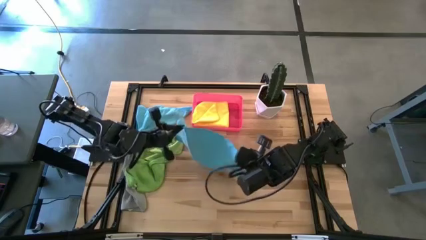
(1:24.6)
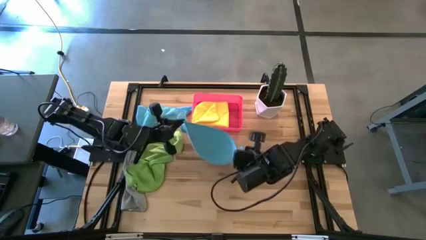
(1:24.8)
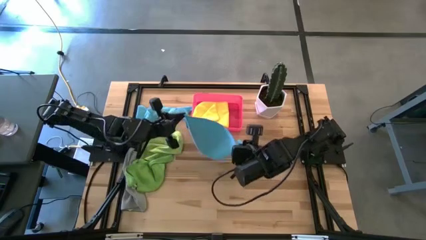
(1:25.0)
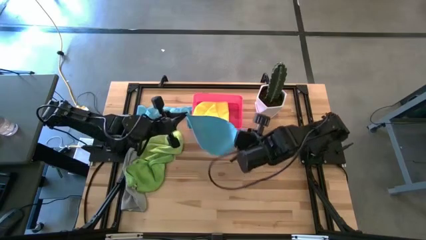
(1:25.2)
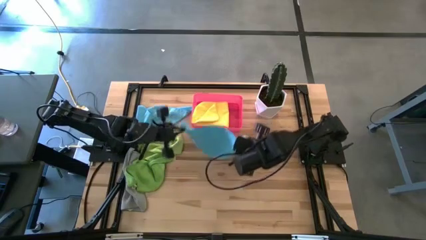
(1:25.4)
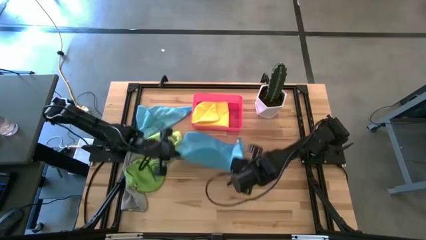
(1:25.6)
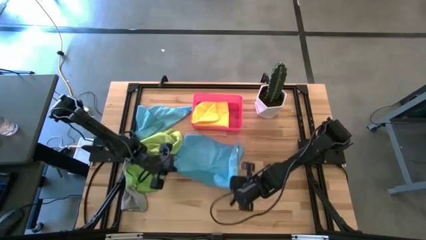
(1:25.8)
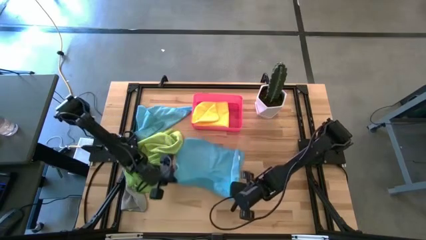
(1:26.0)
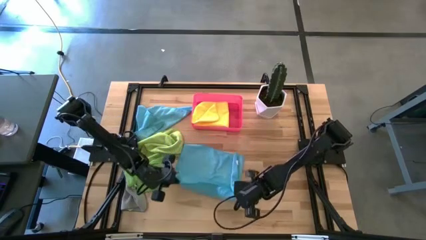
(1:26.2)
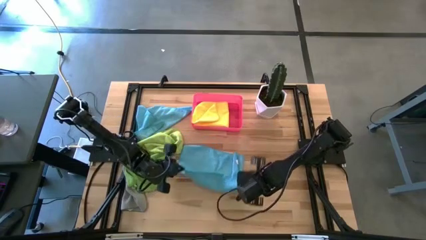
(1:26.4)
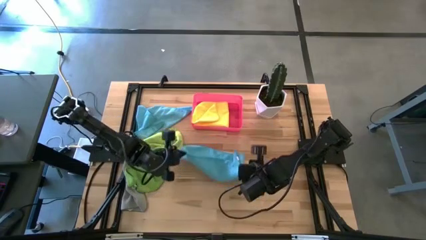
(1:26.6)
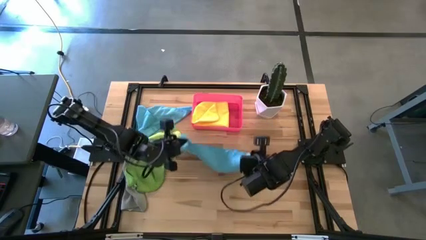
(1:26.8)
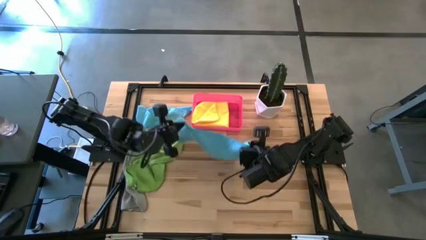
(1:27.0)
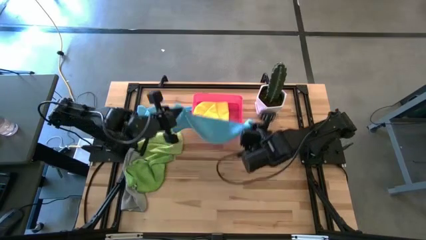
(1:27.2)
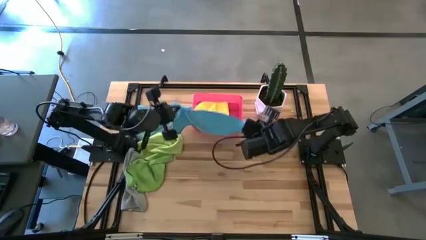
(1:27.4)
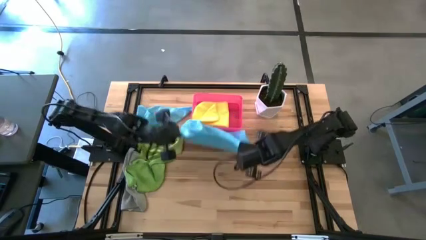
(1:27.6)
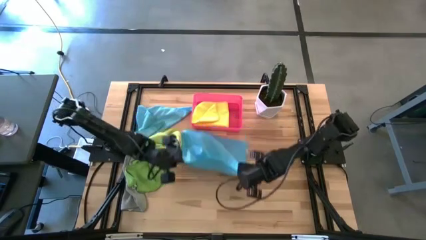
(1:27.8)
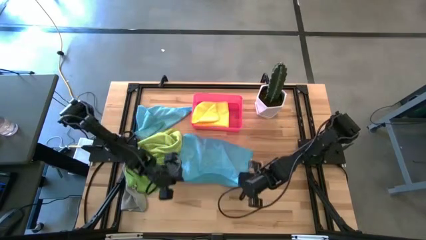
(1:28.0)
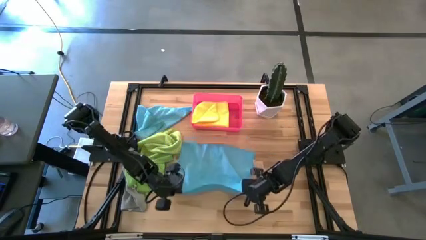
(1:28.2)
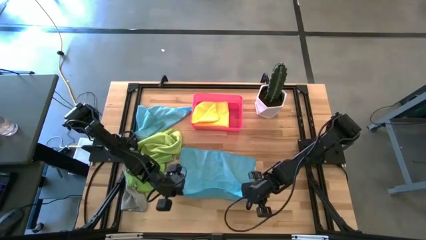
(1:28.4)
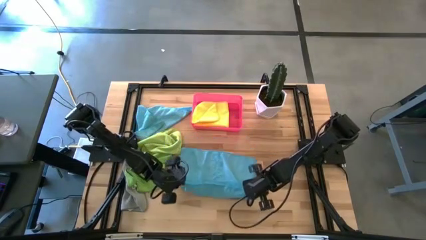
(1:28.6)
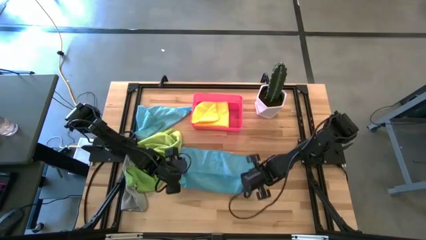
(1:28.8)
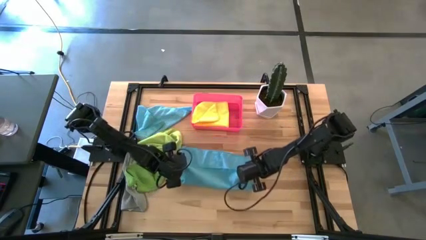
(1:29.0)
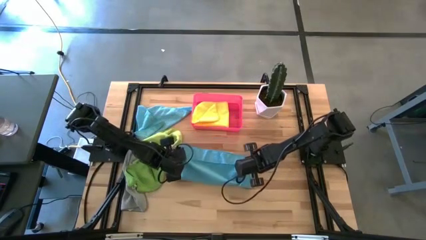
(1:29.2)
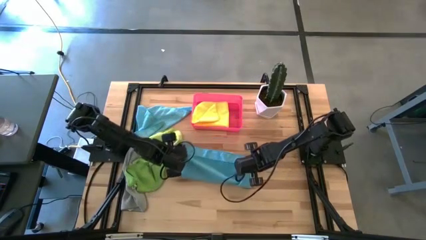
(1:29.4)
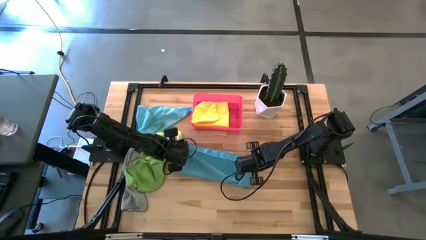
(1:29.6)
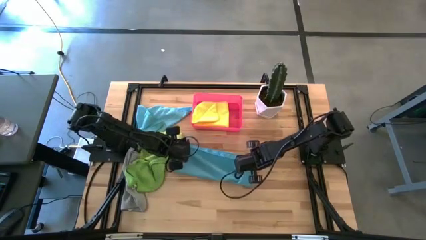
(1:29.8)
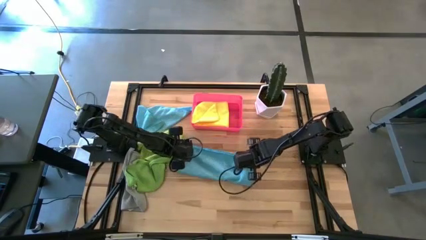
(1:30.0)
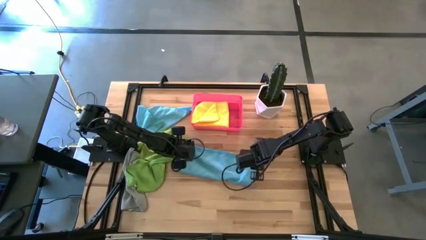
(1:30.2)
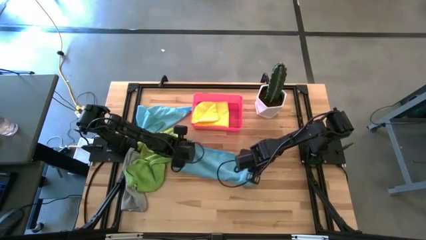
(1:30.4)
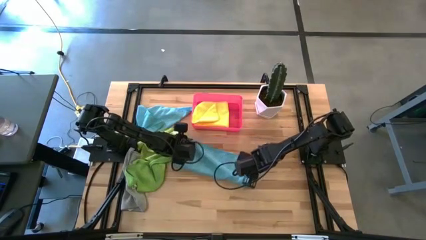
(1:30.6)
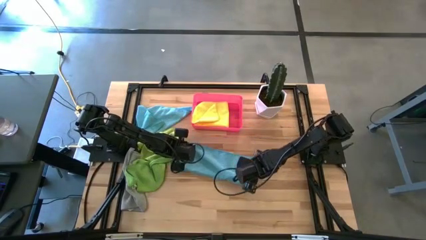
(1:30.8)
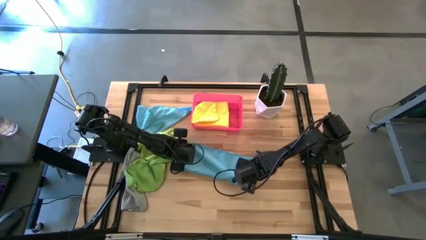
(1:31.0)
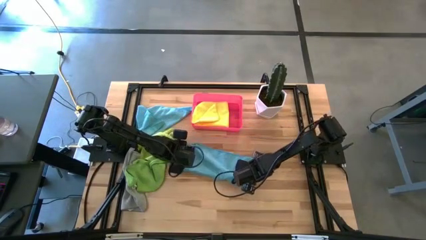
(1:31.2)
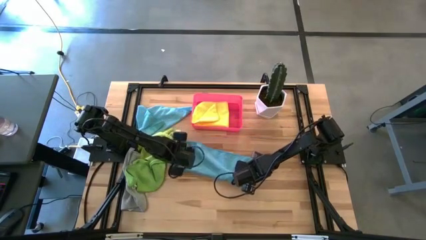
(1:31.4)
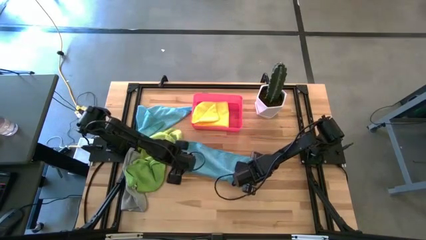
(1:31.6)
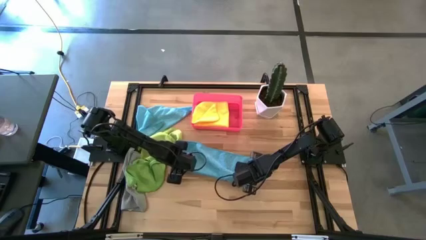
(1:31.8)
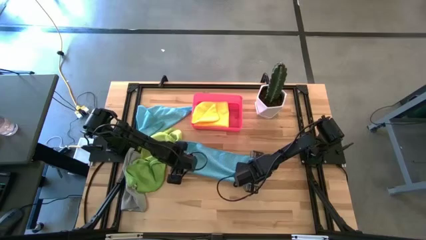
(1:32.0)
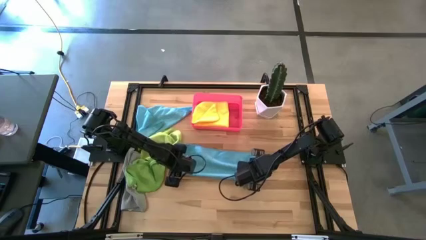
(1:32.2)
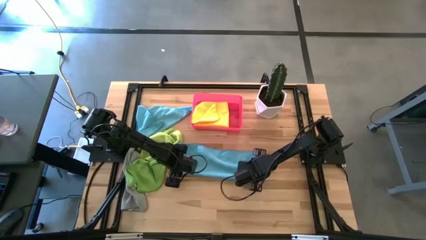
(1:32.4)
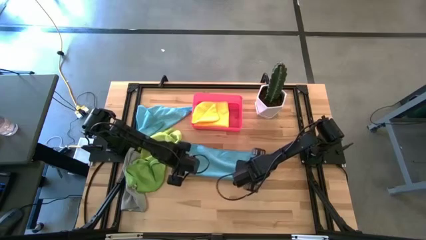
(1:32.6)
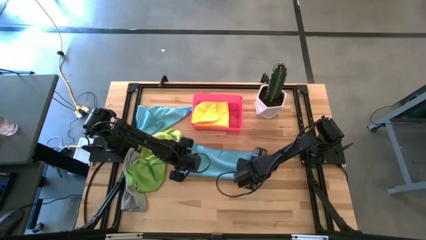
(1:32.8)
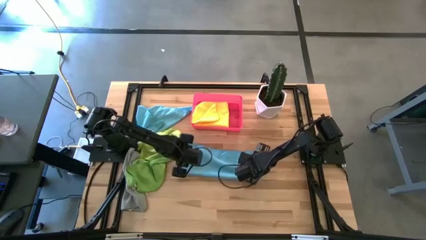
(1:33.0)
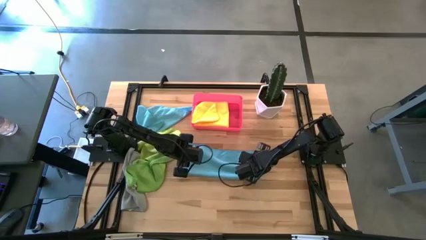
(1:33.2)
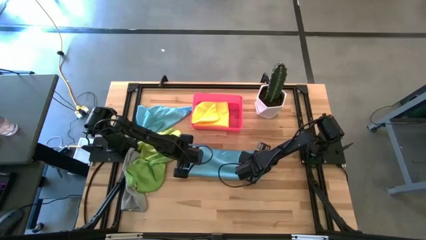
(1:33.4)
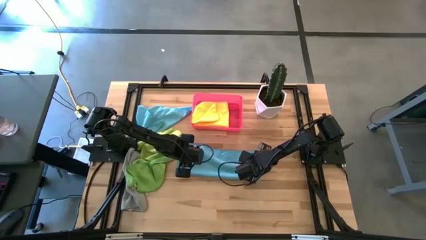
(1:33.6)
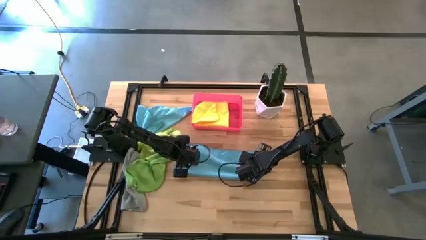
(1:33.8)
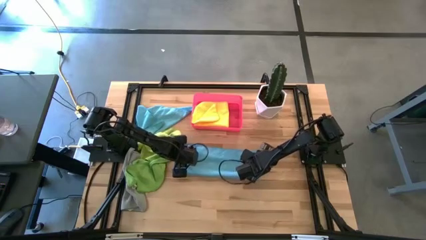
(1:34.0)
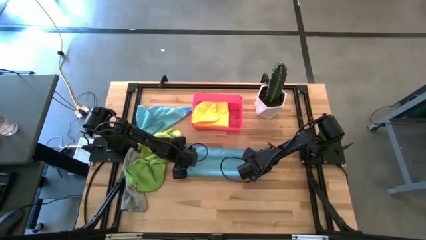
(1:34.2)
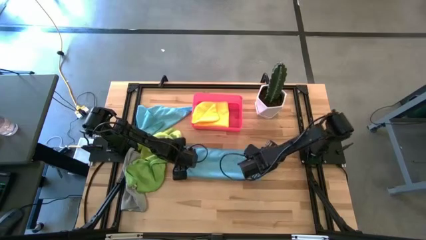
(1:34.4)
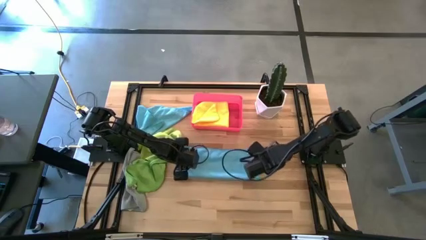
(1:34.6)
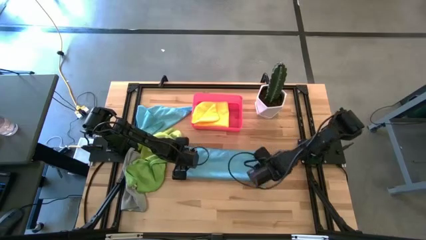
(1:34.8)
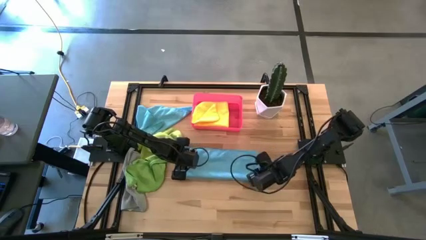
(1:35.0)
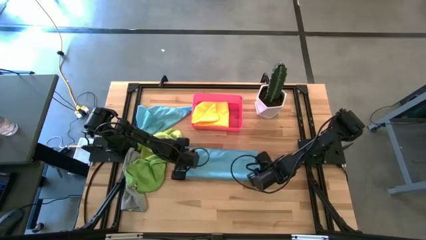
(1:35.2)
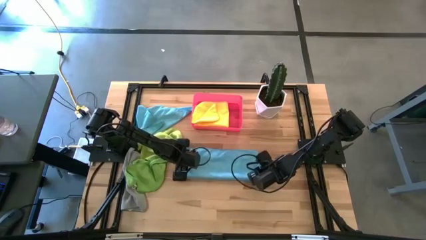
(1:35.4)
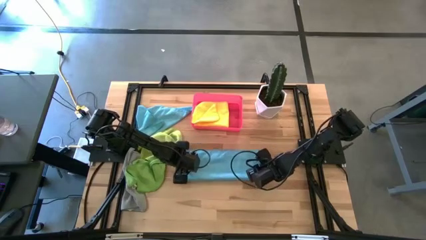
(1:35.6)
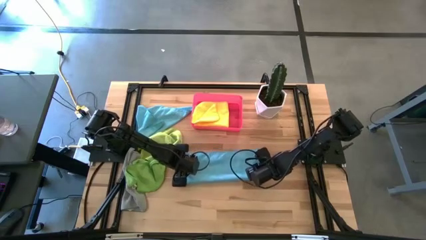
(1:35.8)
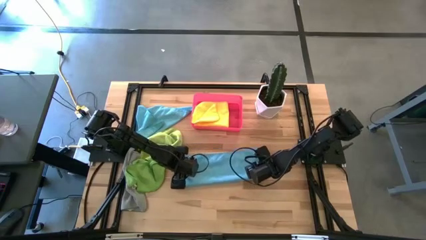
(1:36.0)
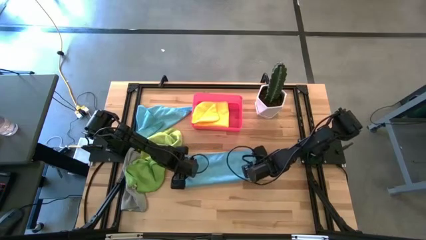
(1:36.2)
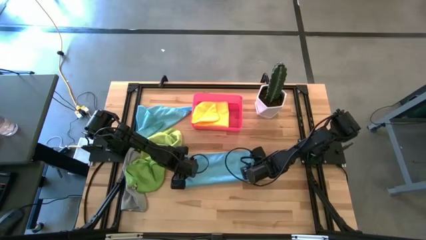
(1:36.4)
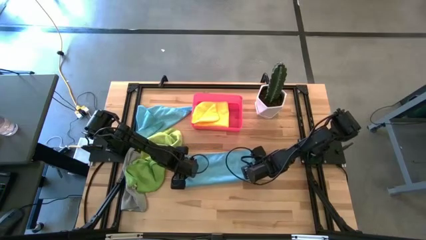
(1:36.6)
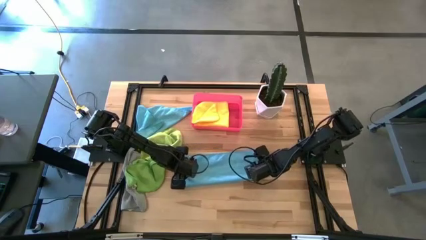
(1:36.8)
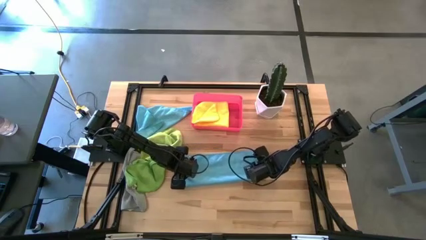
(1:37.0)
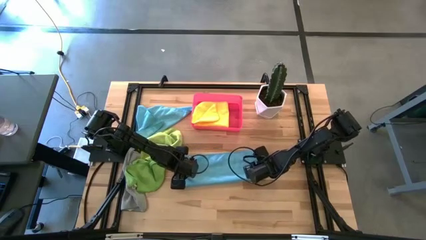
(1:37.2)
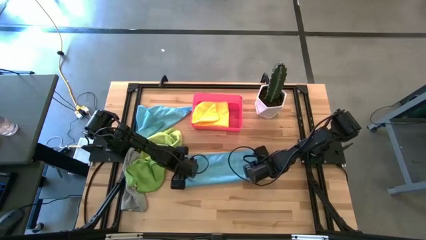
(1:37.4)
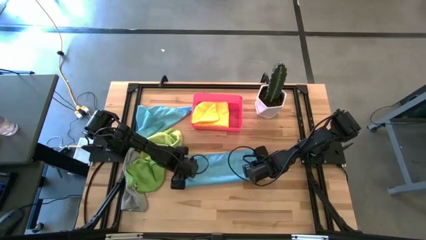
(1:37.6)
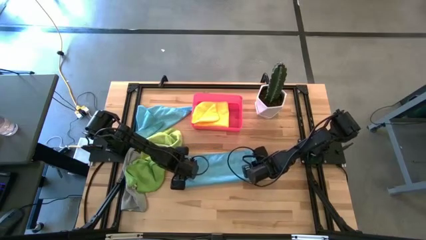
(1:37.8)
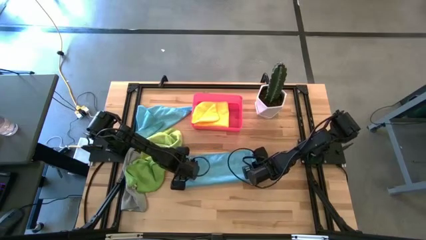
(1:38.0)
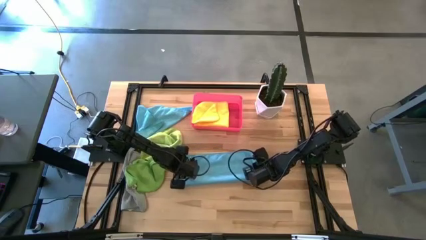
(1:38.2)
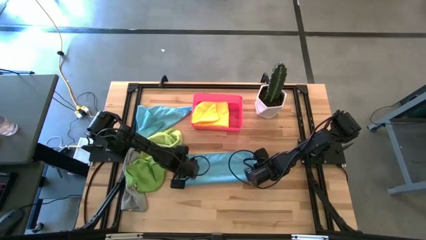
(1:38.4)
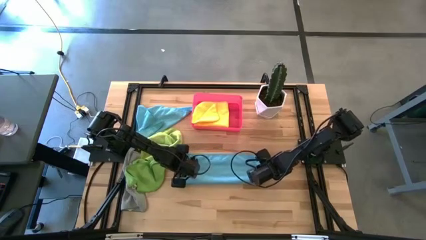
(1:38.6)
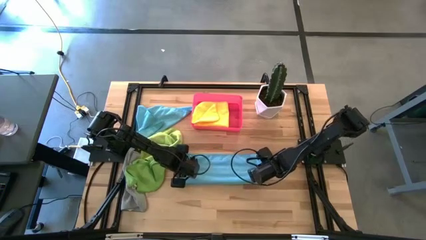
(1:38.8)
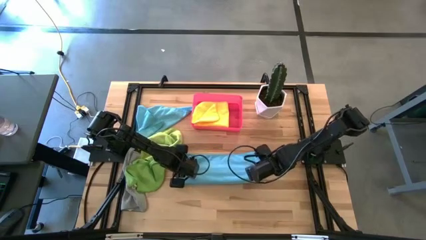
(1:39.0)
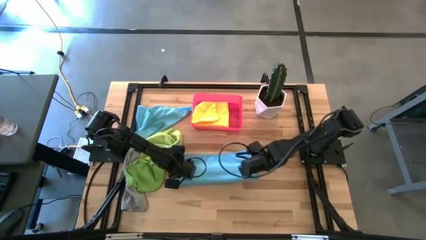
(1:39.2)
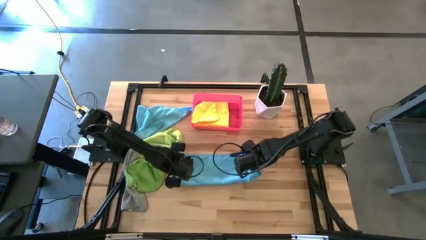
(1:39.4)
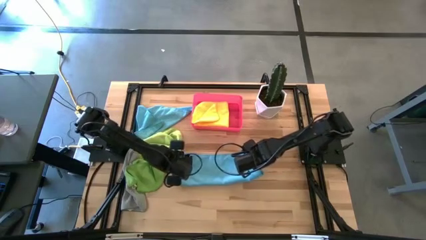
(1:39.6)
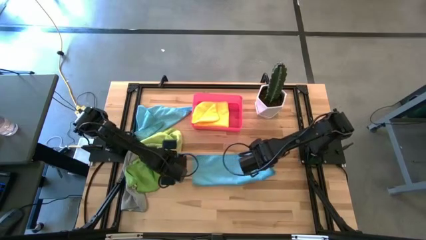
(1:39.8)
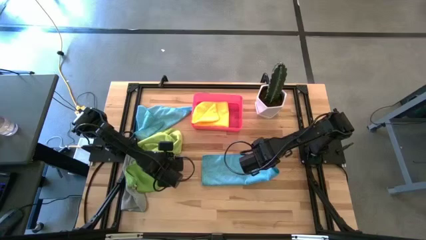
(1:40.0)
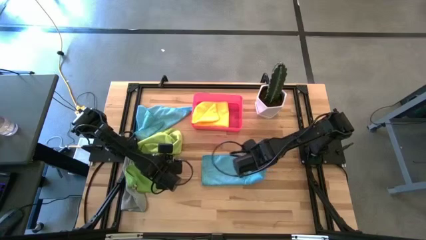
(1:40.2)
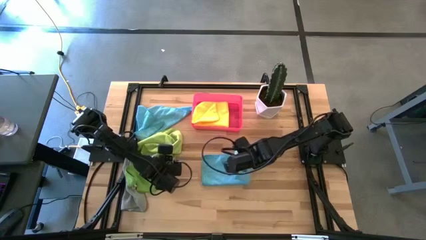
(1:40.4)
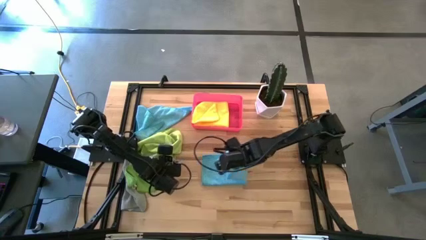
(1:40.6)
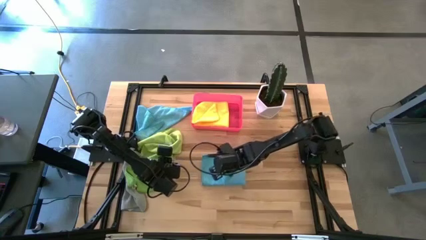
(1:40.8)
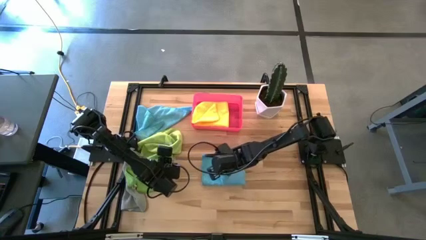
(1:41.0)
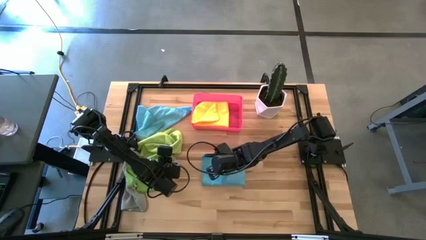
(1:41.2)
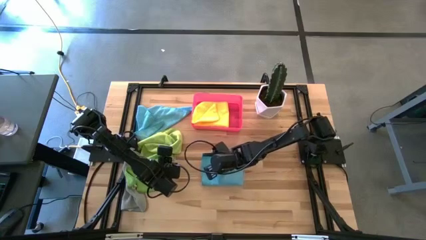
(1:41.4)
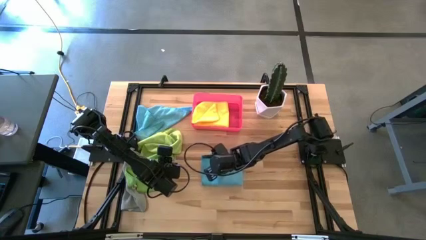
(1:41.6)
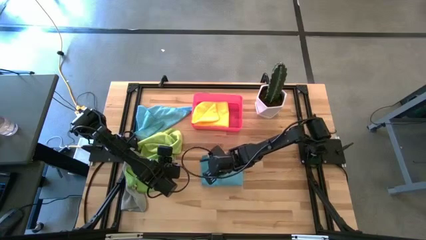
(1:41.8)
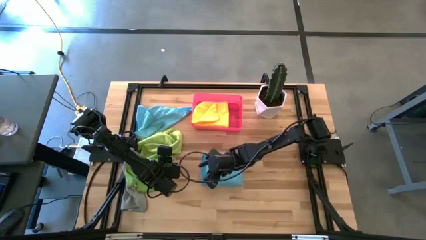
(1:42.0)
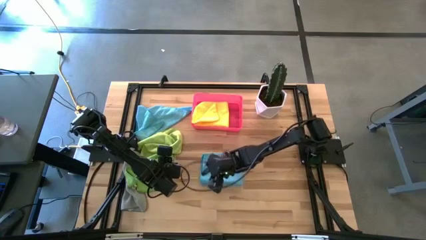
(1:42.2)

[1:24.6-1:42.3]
Task: Fold microfiber towels
Fold the bottom light blue microfiber cloth on the table
